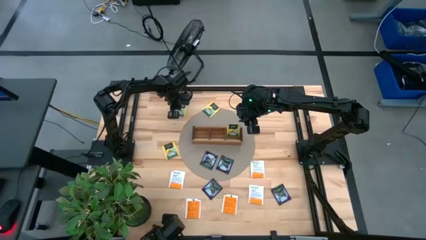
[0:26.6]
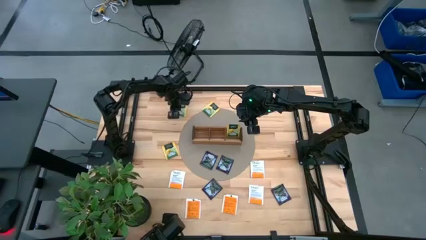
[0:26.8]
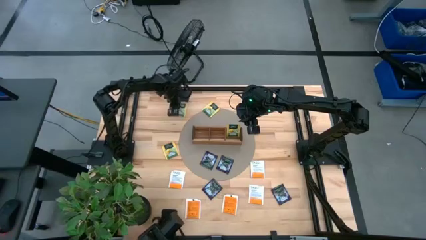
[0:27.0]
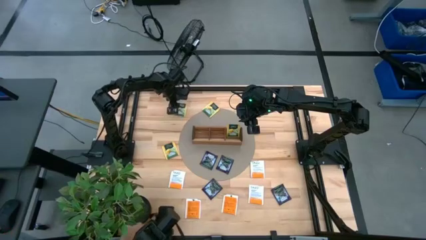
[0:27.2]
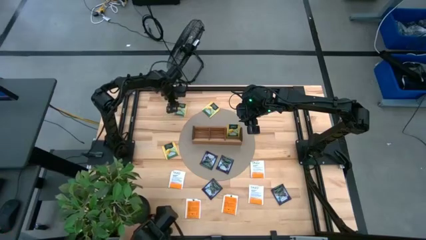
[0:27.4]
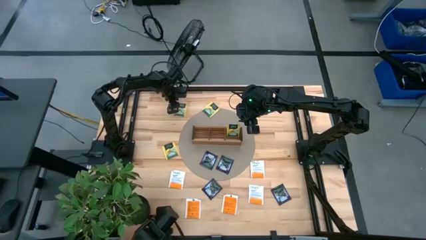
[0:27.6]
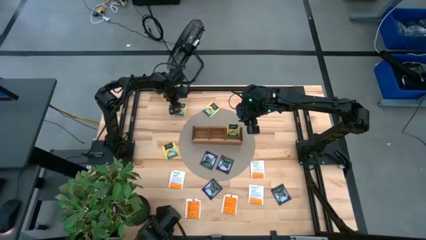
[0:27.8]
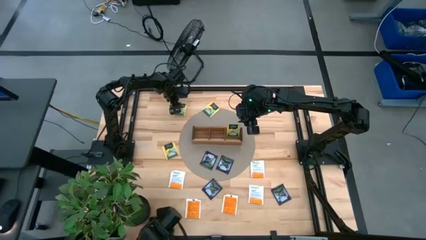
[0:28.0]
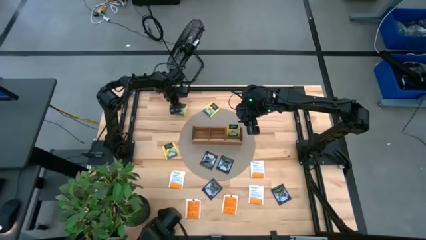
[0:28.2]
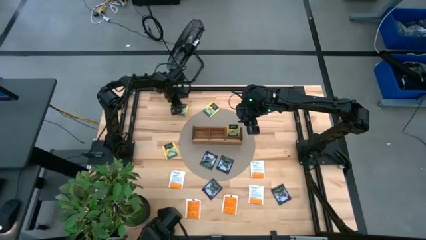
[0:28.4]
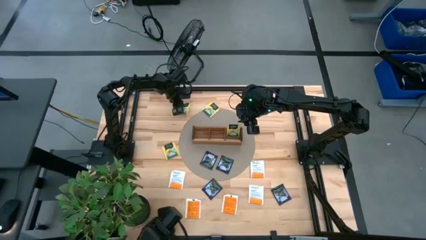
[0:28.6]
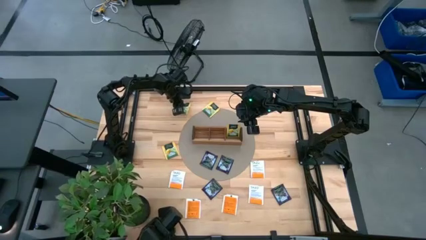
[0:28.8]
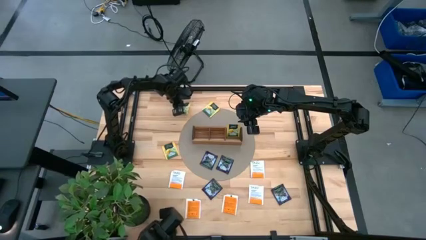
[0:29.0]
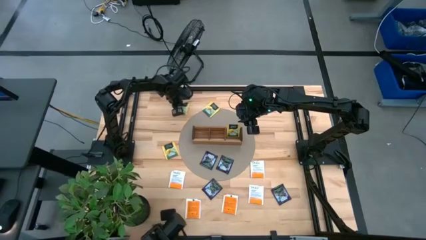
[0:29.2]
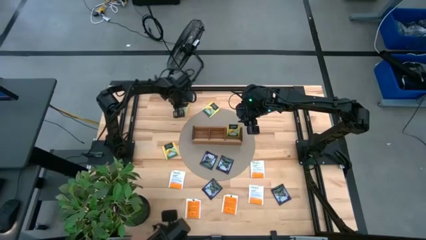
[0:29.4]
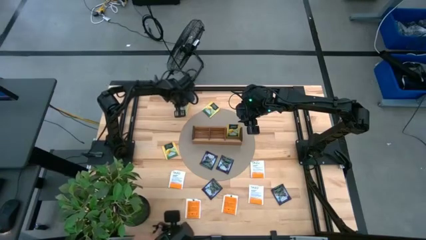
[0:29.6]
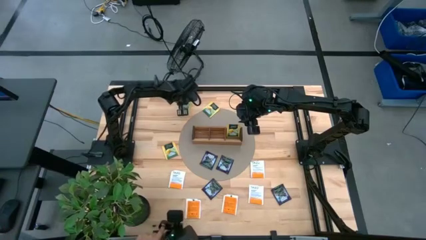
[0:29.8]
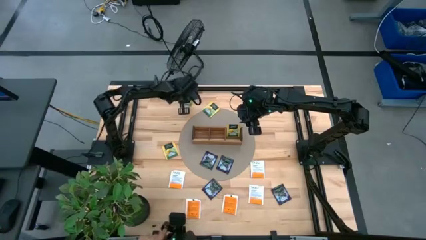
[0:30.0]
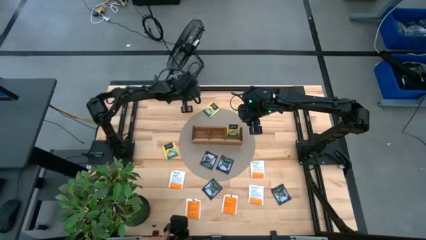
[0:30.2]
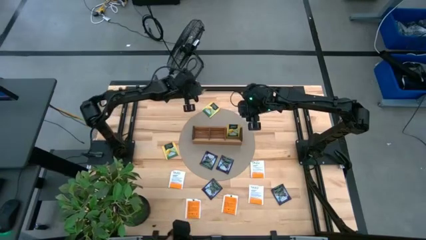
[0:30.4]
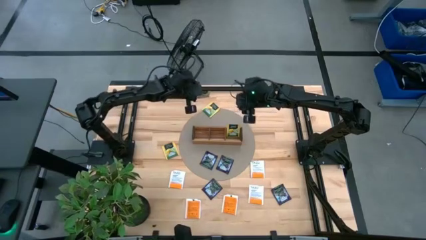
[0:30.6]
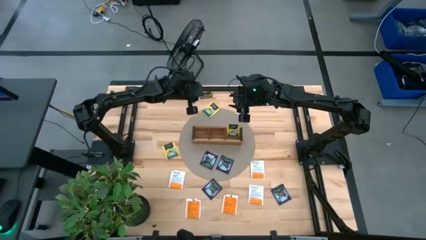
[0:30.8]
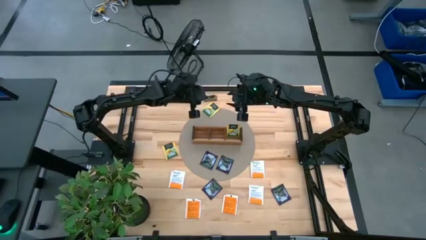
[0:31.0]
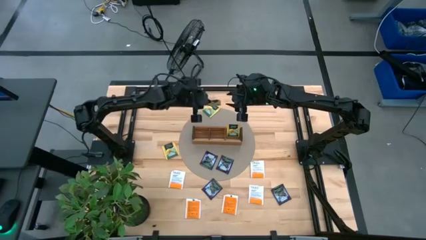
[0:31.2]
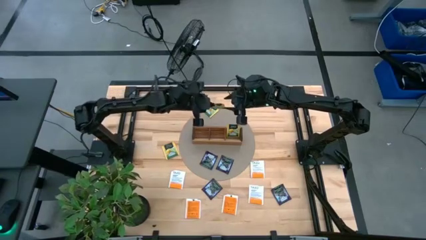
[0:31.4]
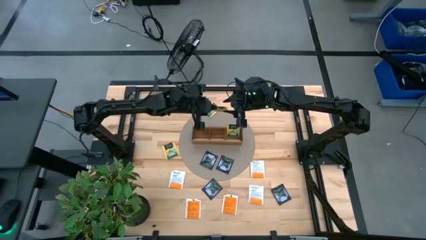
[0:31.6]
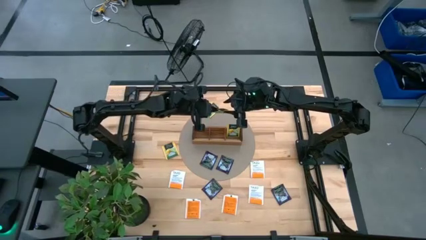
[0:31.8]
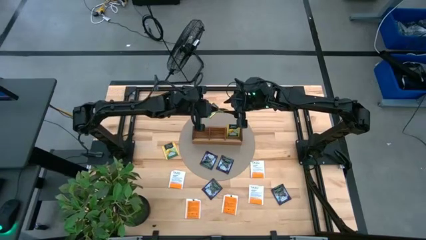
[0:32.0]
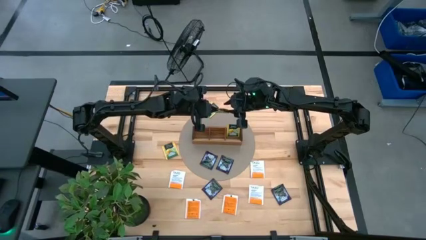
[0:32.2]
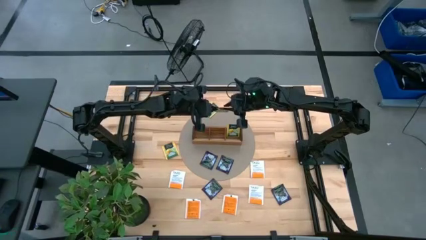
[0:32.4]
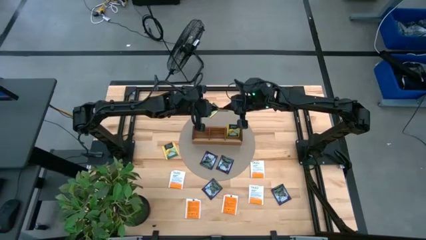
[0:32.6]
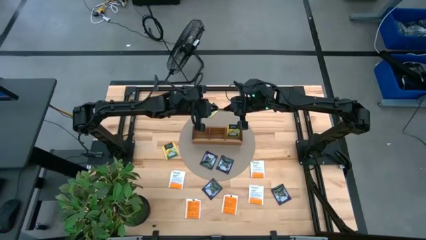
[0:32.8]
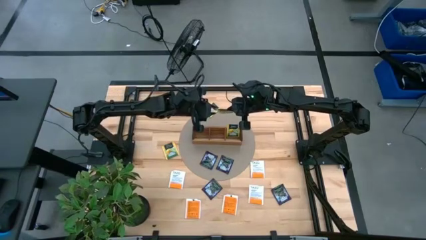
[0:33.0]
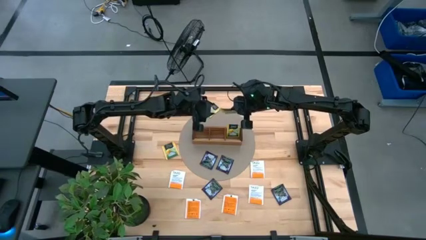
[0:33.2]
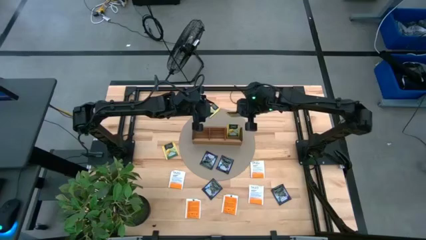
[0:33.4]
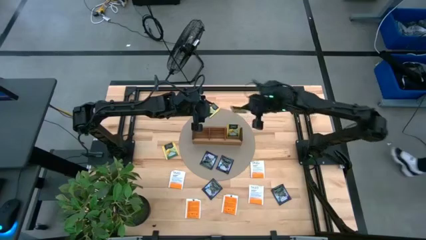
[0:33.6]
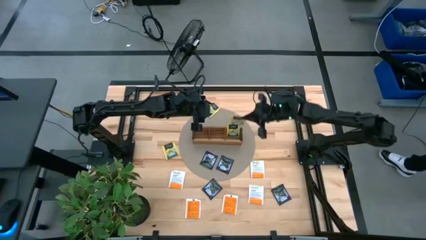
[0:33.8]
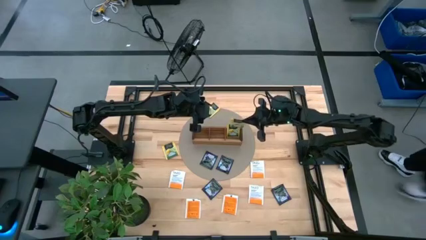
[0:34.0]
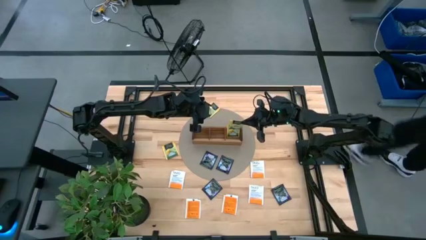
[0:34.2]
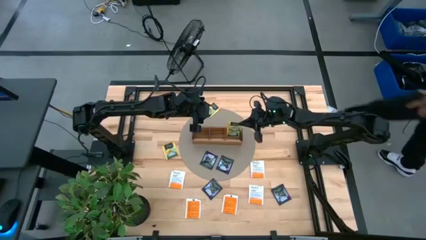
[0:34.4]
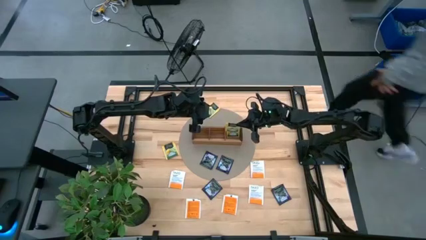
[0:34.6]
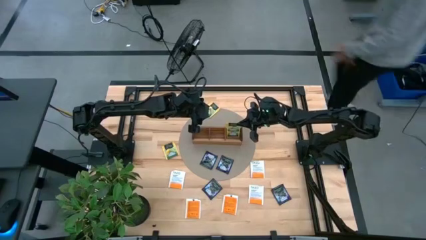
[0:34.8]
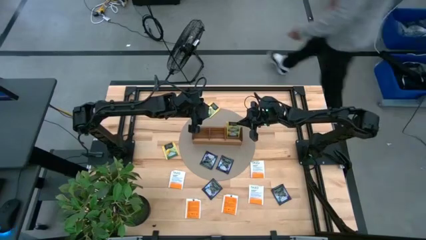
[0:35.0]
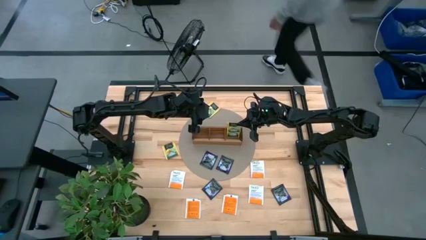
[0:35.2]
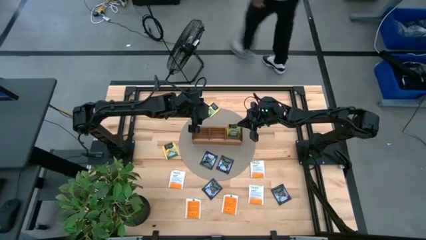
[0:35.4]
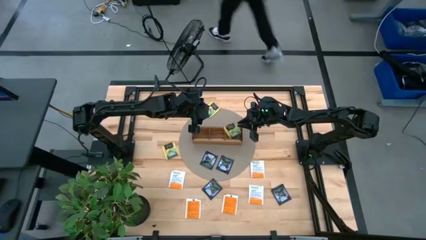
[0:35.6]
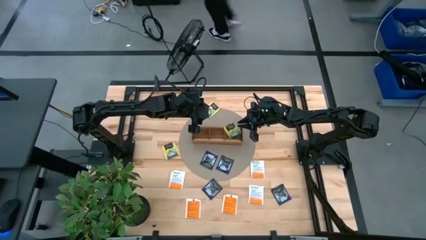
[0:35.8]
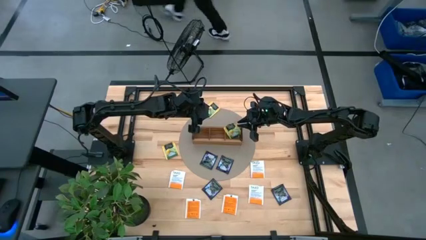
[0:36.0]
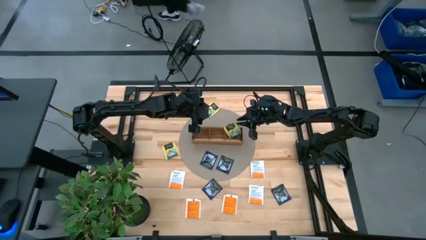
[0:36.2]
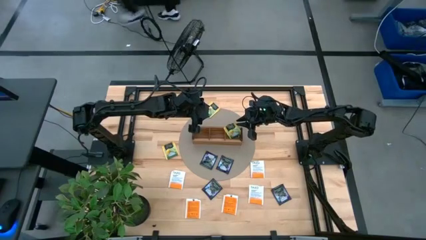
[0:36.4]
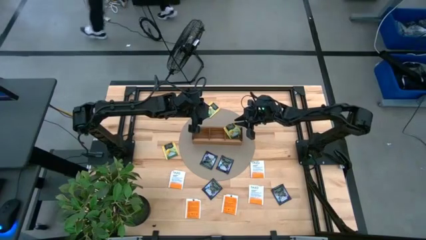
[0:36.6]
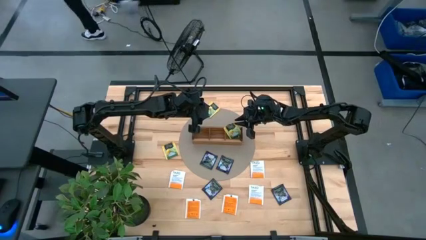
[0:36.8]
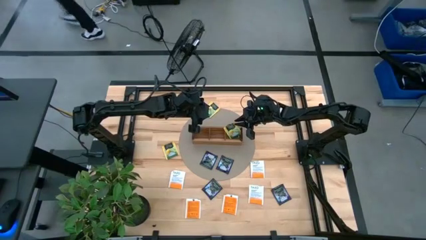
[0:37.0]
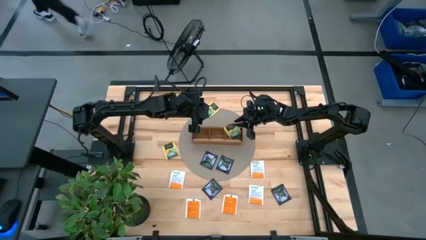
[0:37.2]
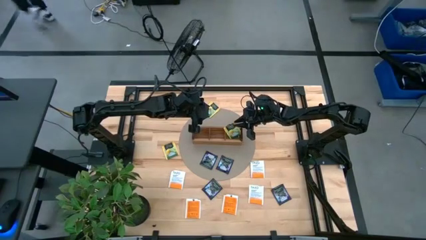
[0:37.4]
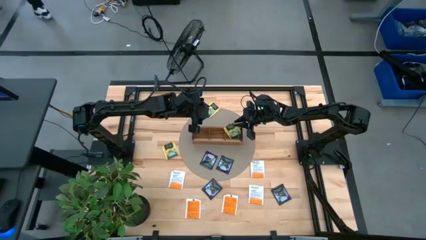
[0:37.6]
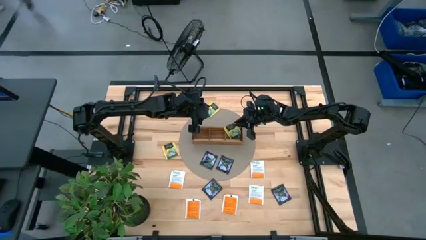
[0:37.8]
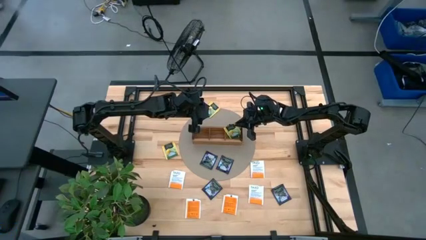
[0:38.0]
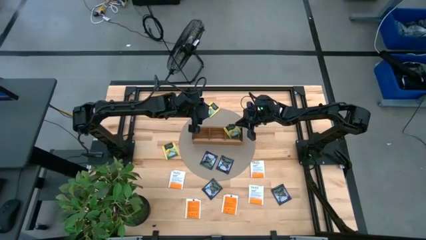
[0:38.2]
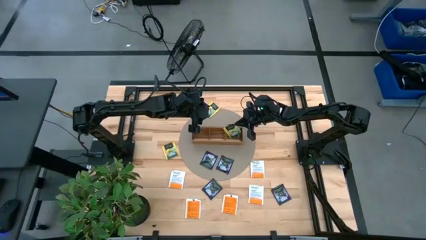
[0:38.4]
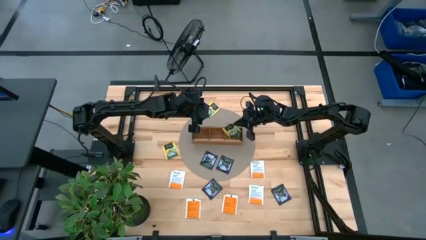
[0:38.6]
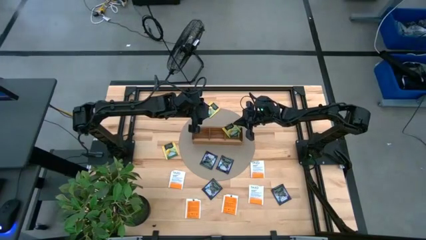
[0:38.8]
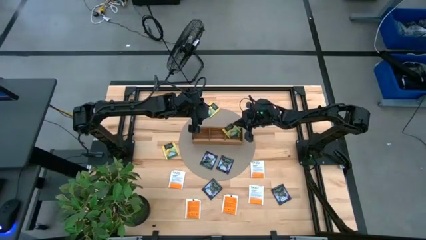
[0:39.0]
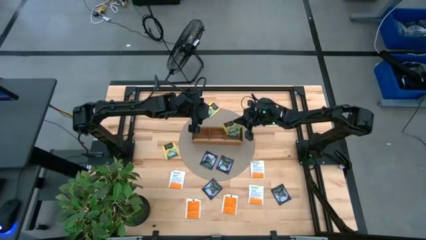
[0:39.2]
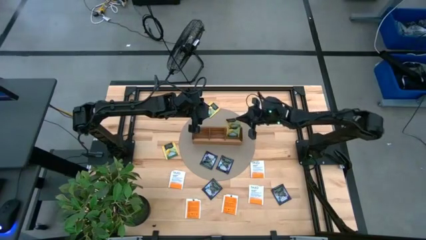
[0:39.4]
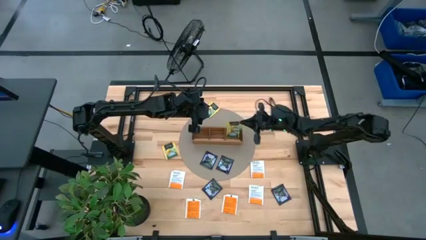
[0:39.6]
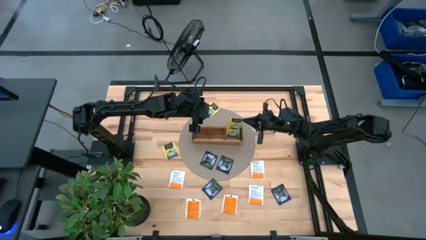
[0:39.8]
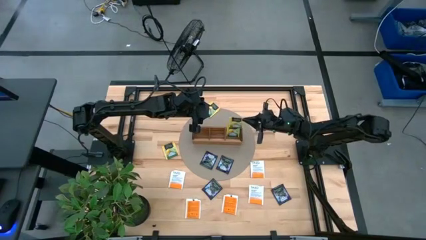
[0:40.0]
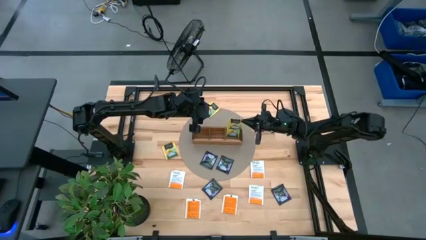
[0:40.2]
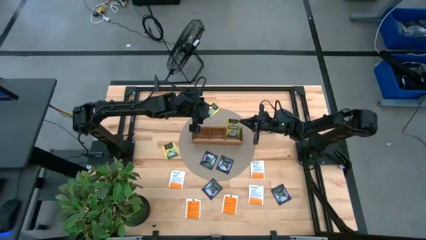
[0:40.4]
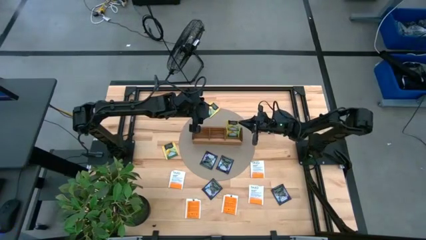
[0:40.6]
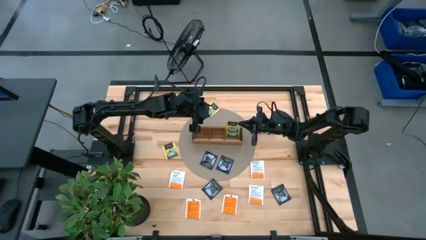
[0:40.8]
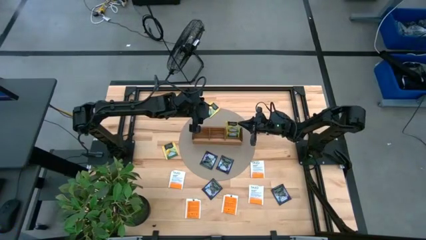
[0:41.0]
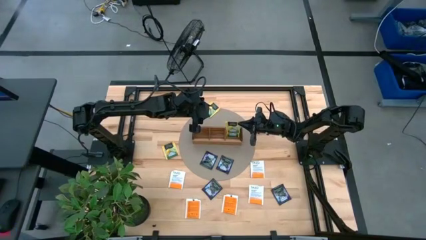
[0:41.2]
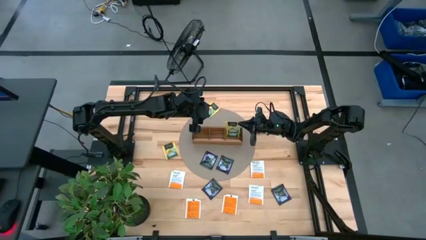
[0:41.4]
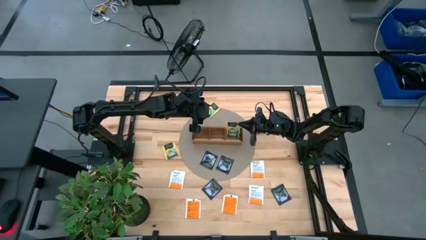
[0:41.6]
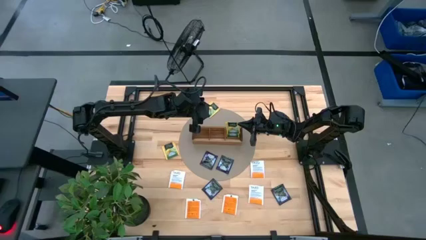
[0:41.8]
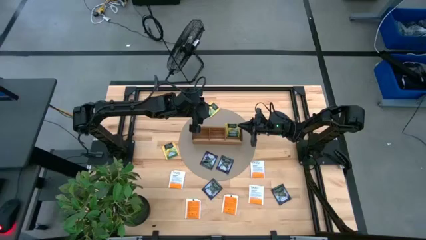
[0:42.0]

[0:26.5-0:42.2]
Task: Pick & Place Tea
Put the yellow tea bag into the right section of the wooden organizer
